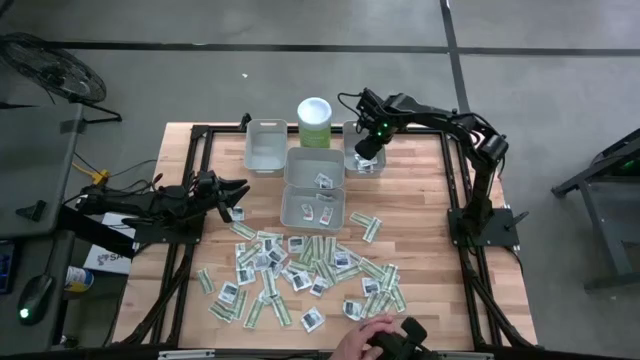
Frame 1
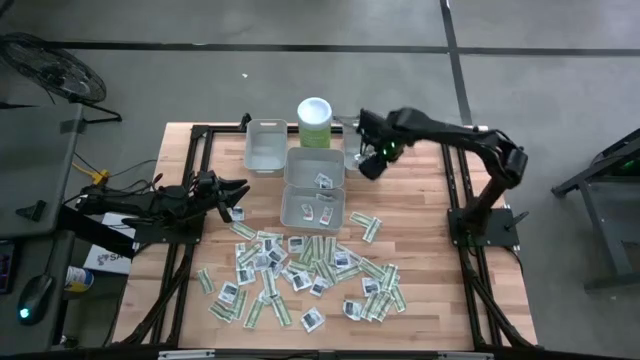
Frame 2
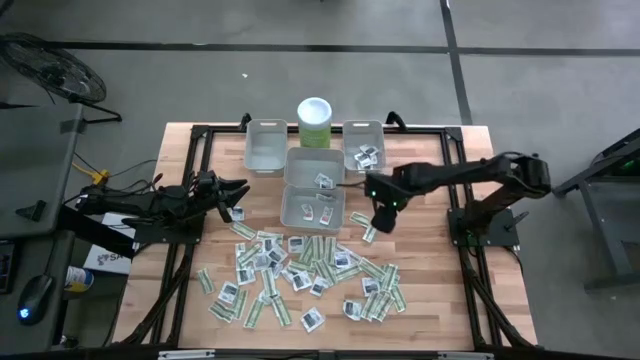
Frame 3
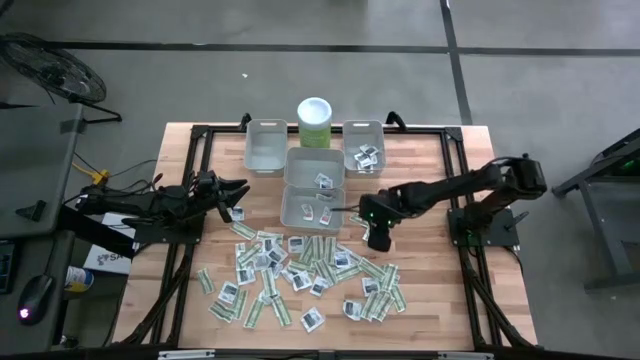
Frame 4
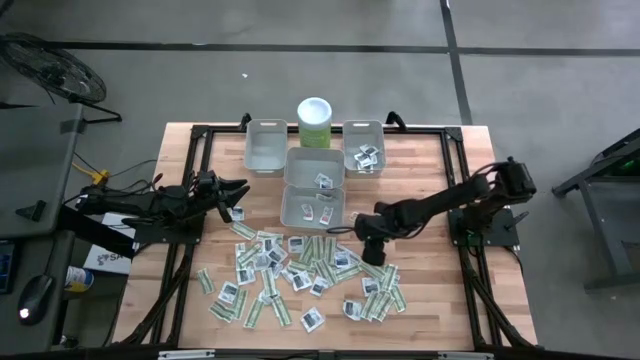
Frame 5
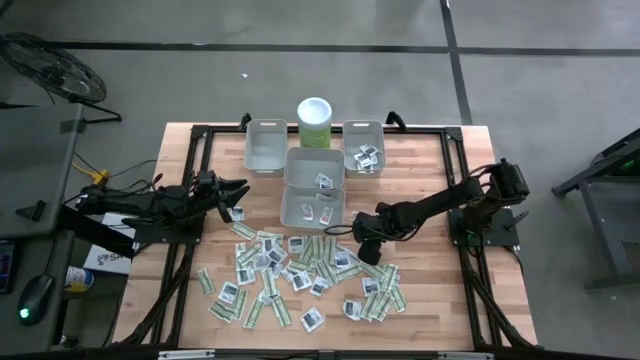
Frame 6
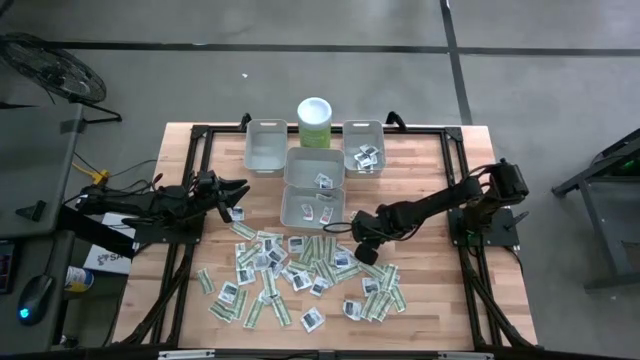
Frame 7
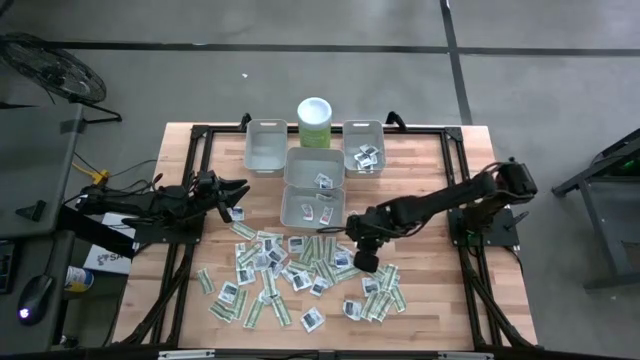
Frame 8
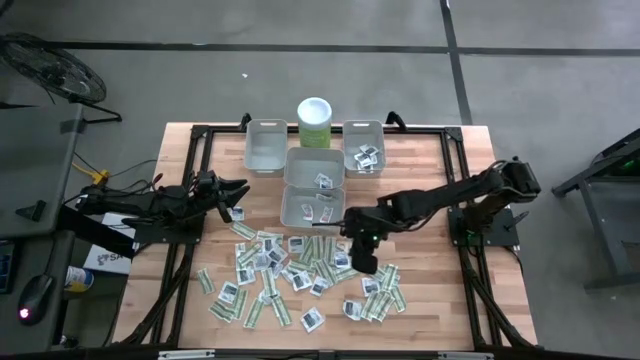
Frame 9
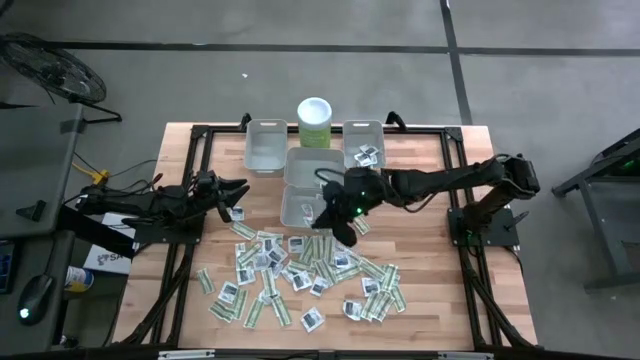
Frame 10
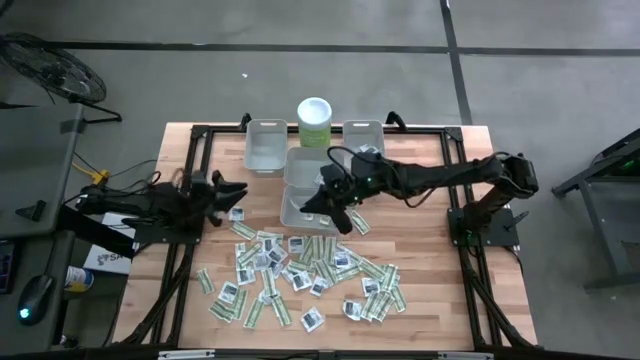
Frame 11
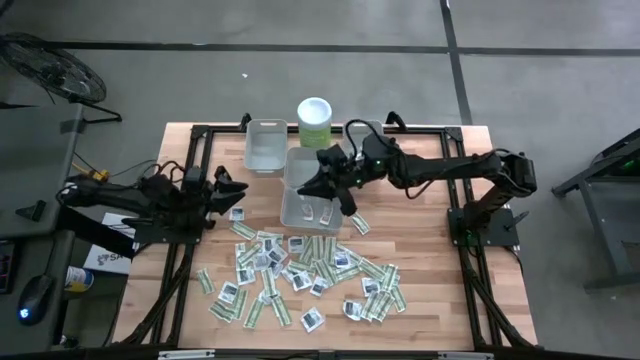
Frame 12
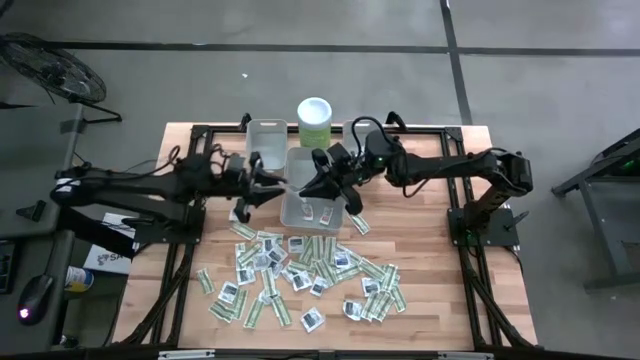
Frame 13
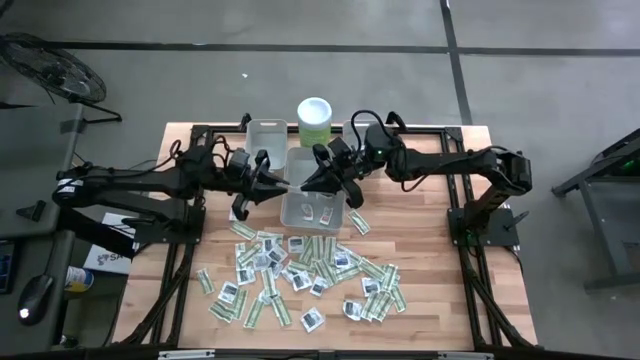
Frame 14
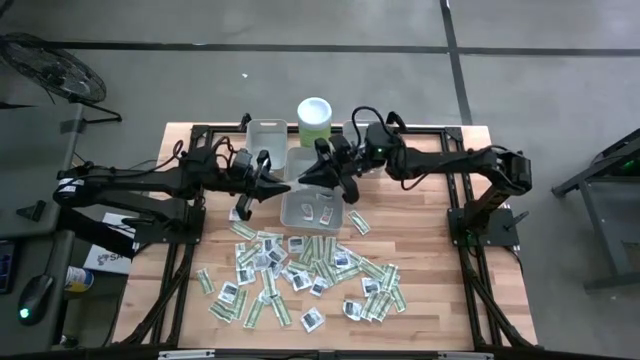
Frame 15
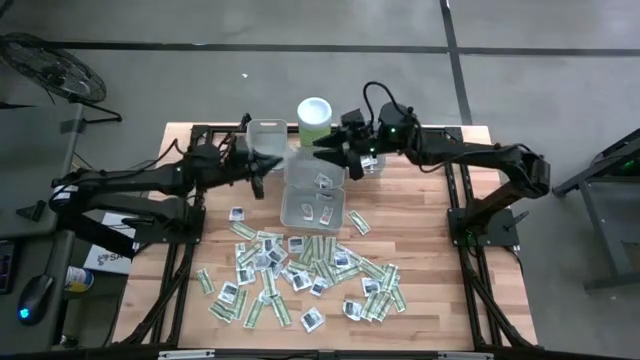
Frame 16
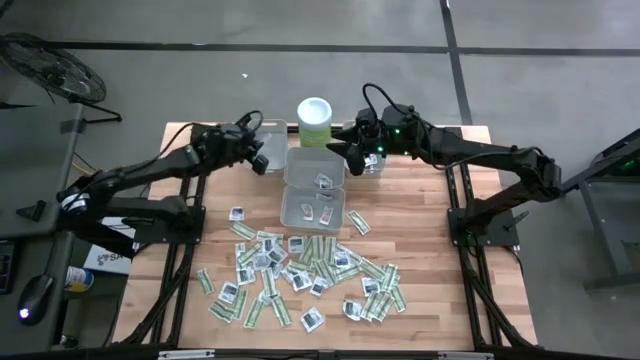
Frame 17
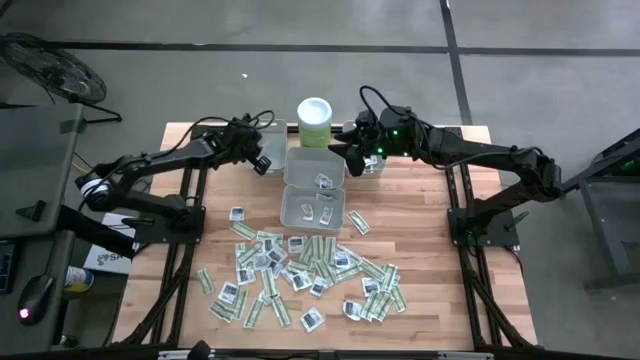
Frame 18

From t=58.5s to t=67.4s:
Task: Pick & Place First Aid Supplies
Put the bandage pack into the left bin

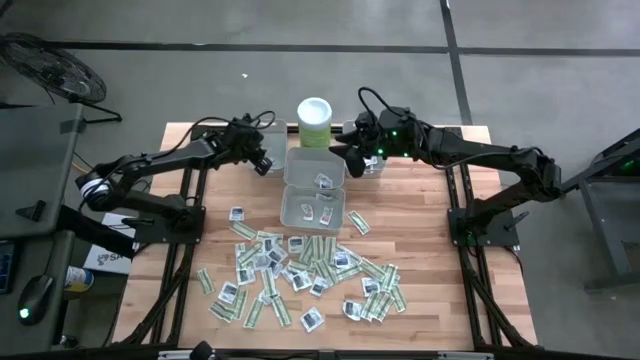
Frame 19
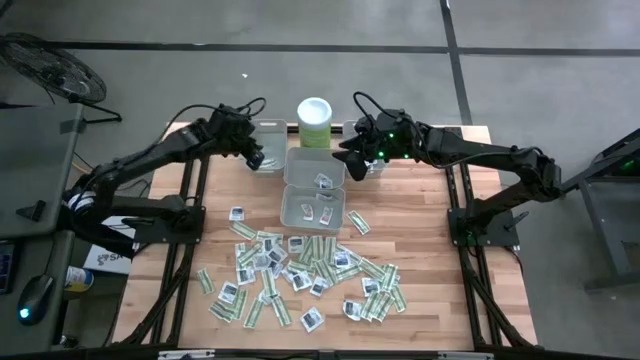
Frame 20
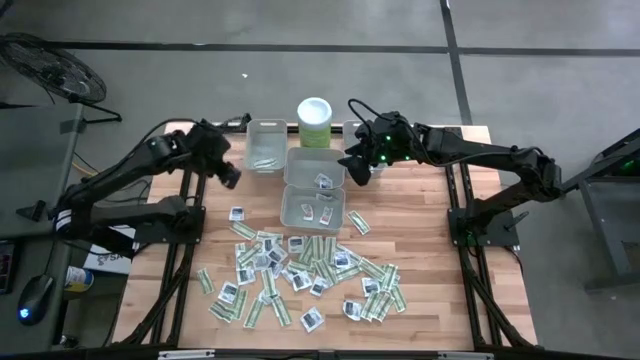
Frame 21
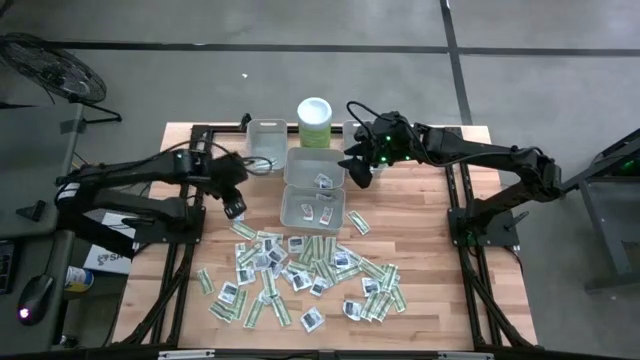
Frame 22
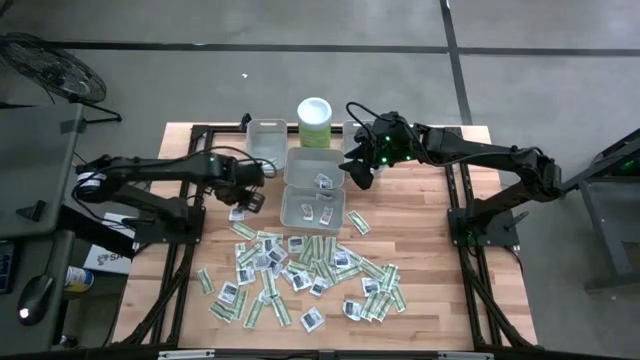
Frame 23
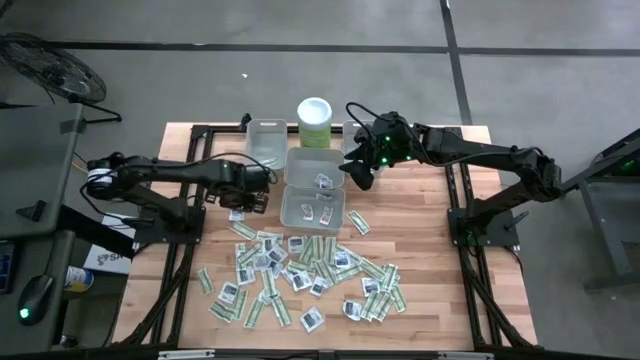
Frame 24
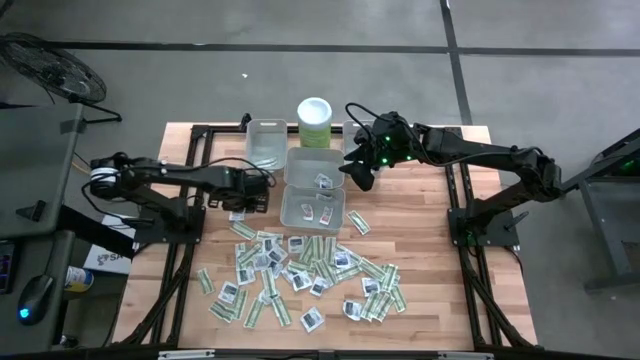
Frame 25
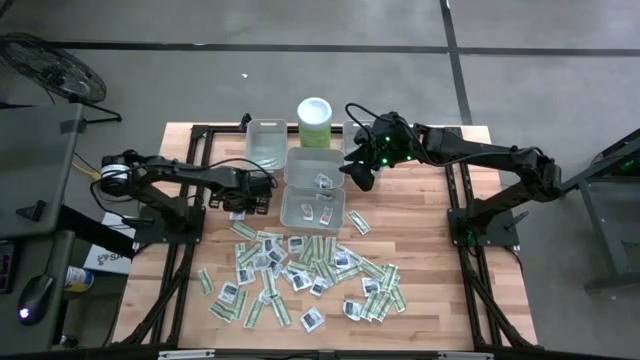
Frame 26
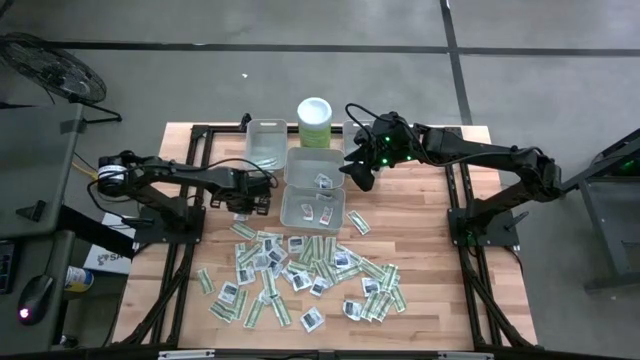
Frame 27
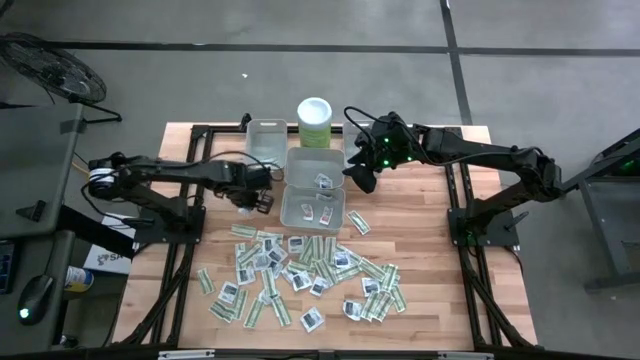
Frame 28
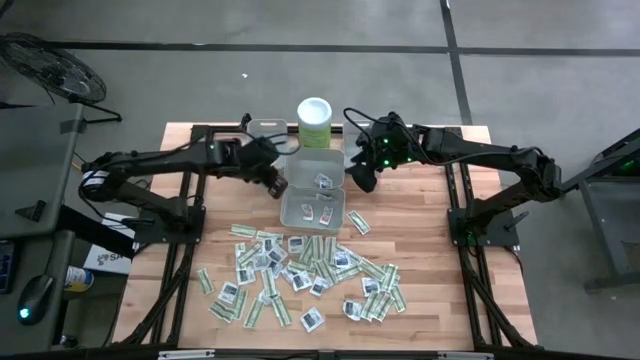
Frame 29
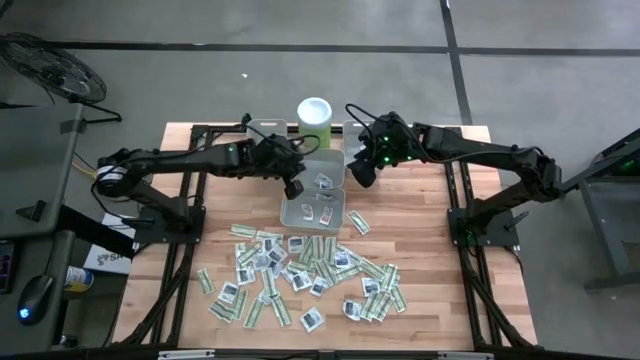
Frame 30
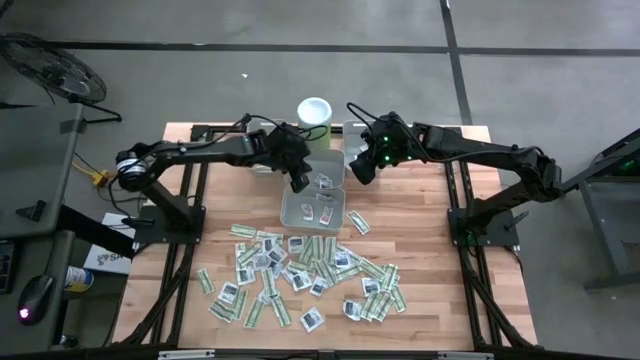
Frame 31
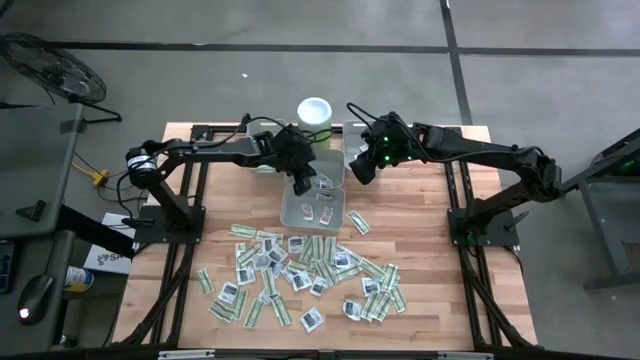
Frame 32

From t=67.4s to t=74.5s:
Put the left alcohol pad into the top center bin

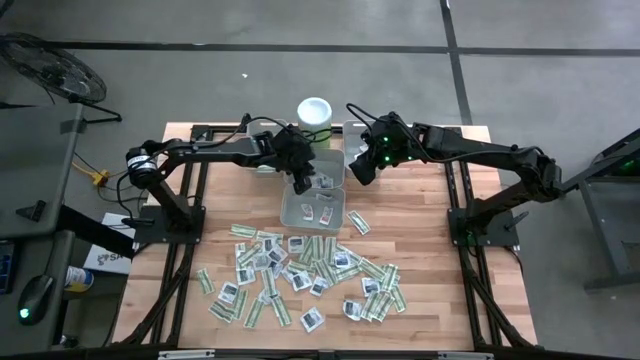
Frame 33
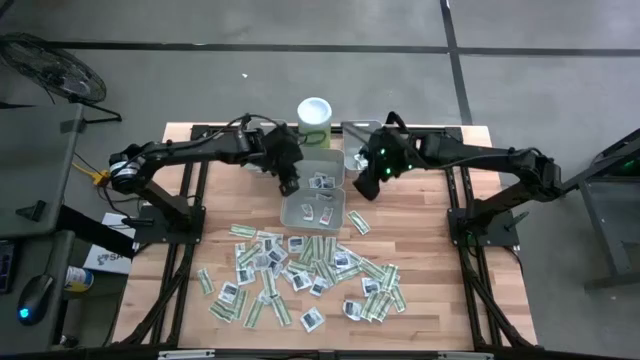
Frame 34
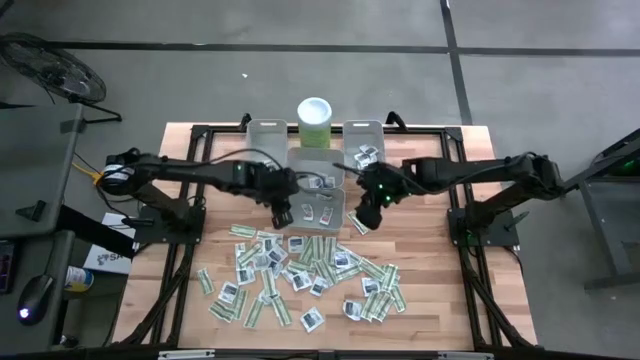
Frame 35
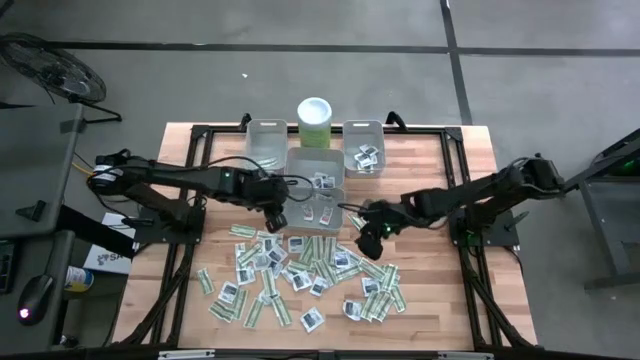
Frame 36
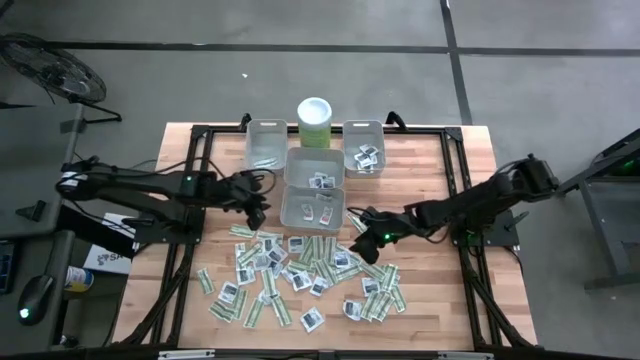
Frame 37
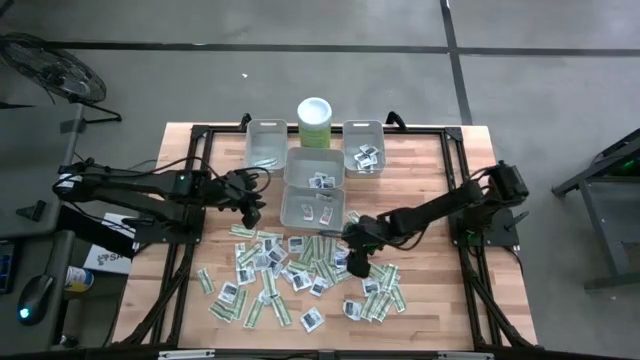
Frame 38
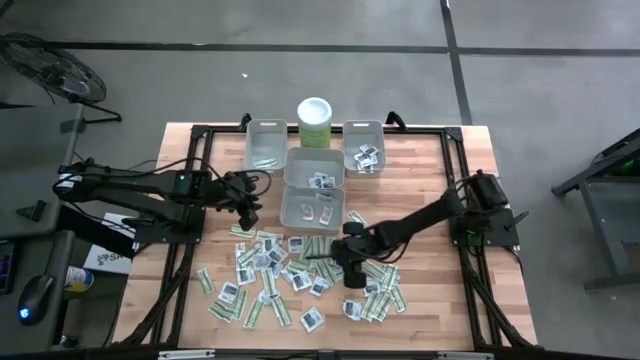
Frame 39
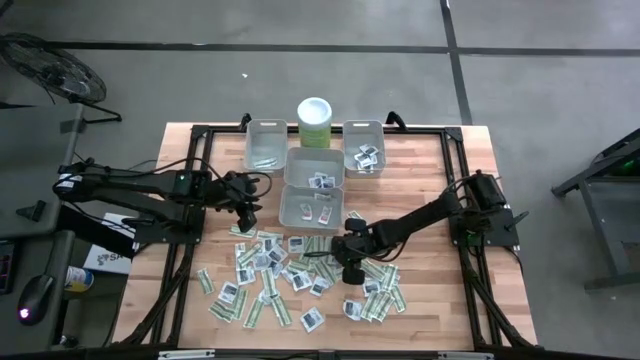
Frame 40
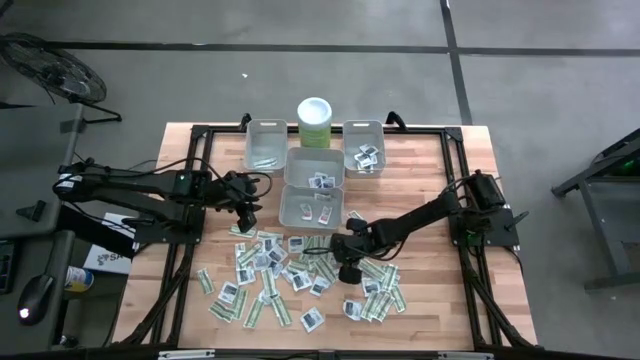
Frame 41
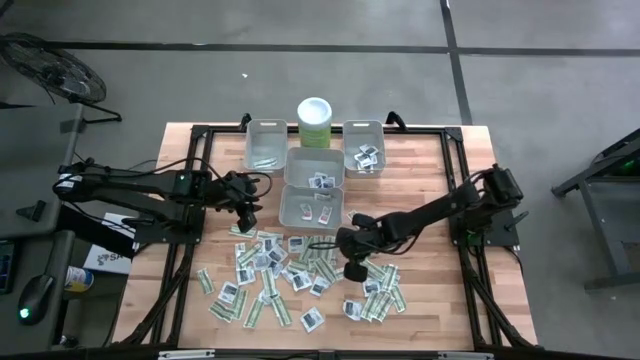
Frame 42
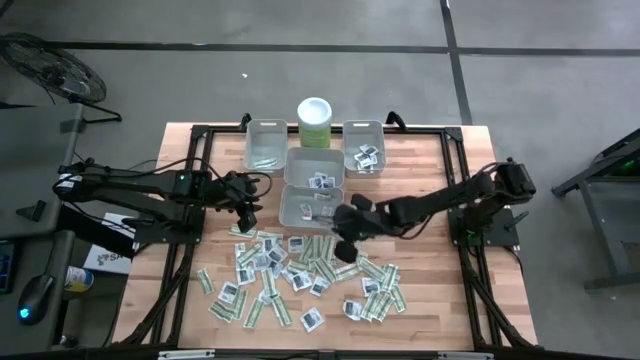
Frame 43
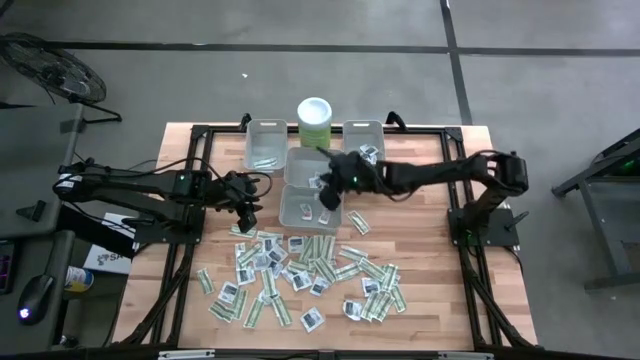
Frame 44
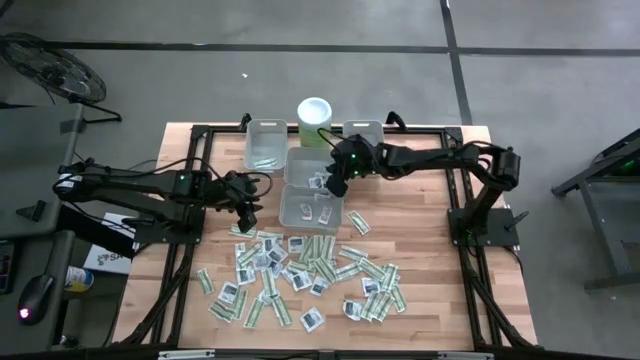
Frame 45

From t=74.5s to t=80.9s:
Put the middle alcohol pad into the top center bin
